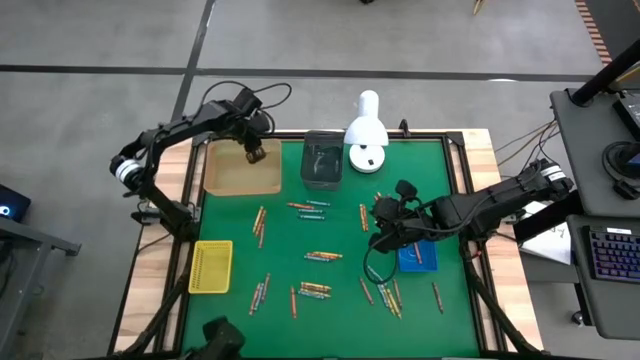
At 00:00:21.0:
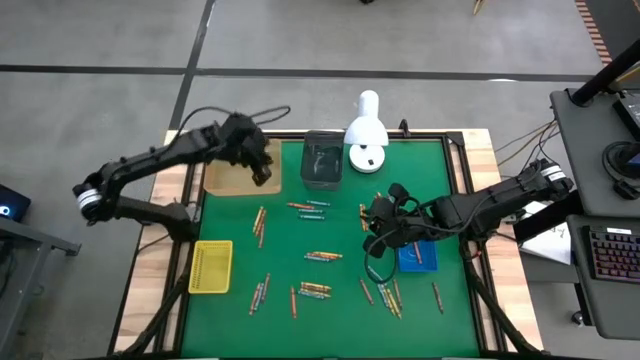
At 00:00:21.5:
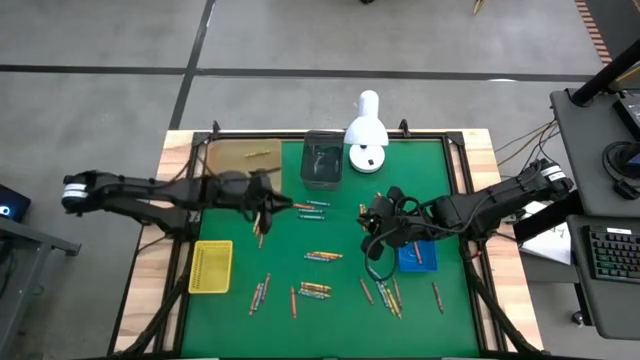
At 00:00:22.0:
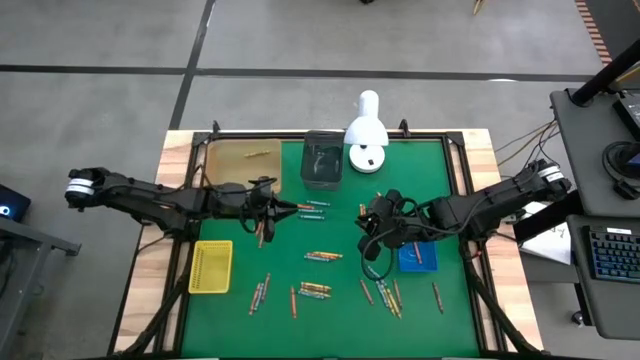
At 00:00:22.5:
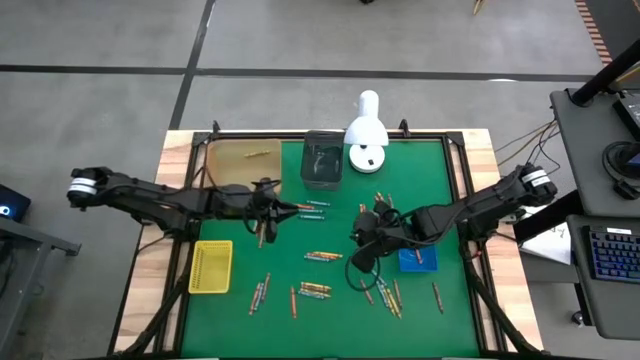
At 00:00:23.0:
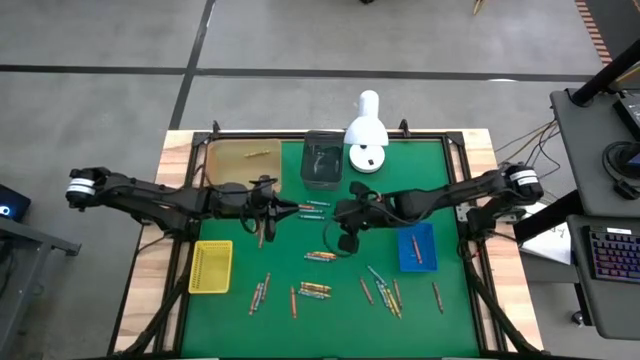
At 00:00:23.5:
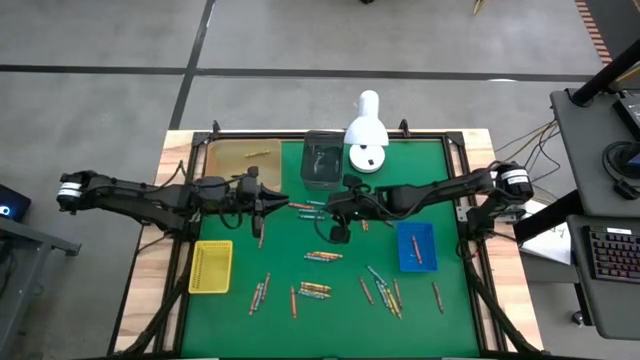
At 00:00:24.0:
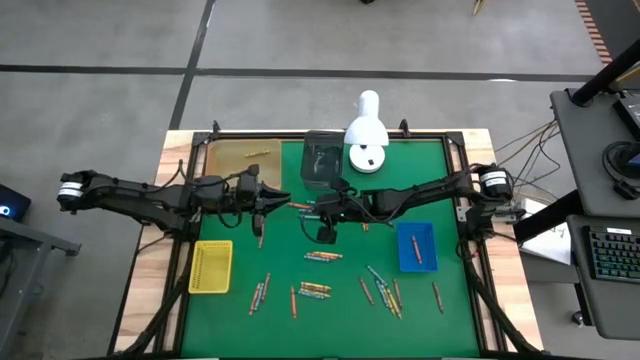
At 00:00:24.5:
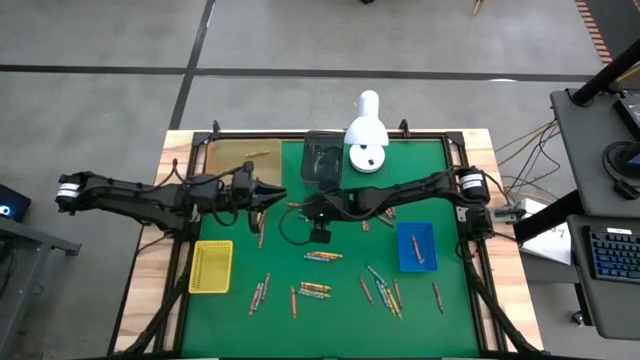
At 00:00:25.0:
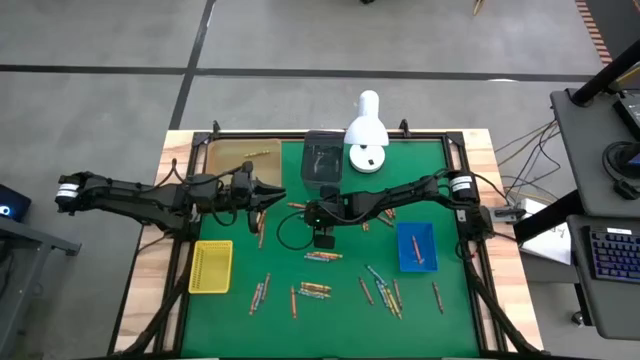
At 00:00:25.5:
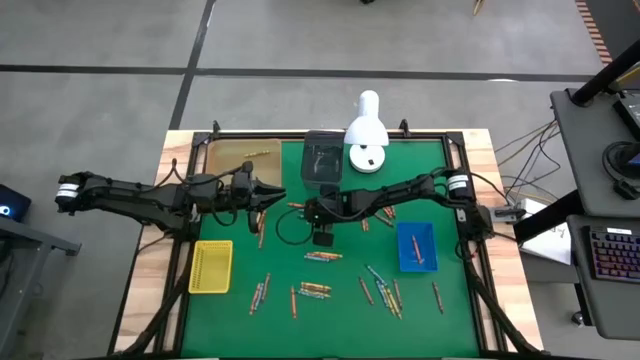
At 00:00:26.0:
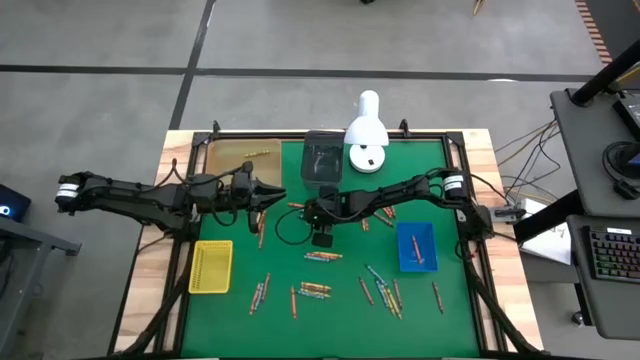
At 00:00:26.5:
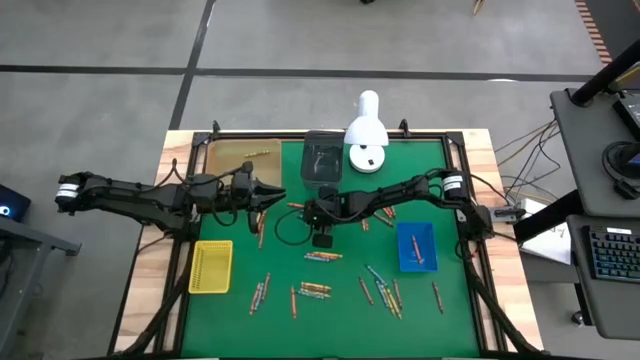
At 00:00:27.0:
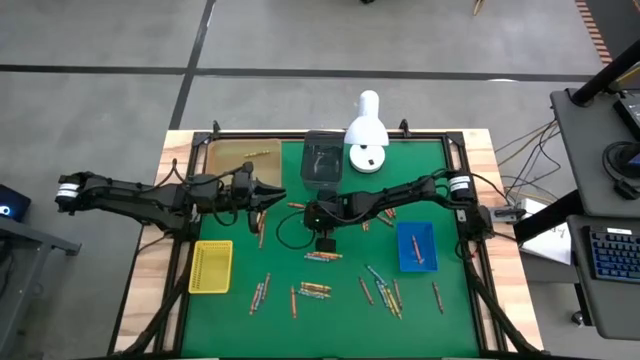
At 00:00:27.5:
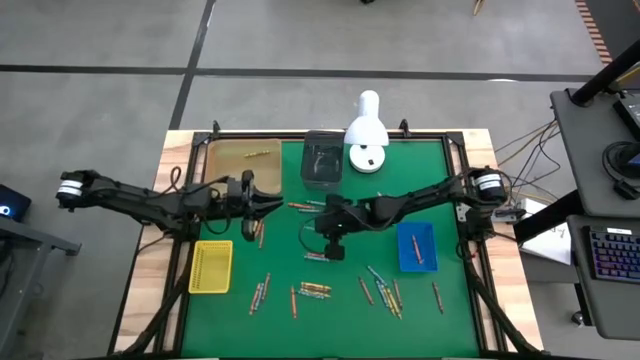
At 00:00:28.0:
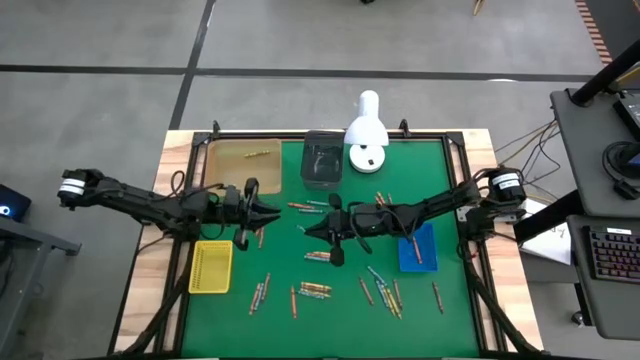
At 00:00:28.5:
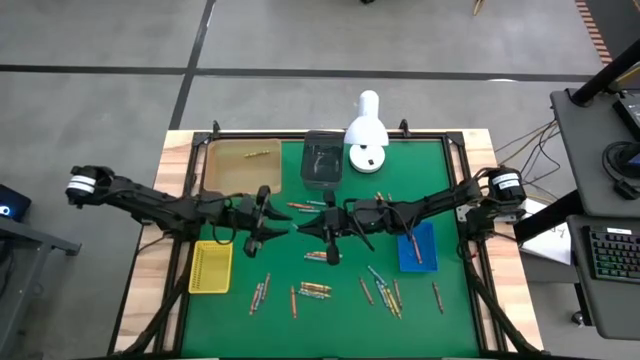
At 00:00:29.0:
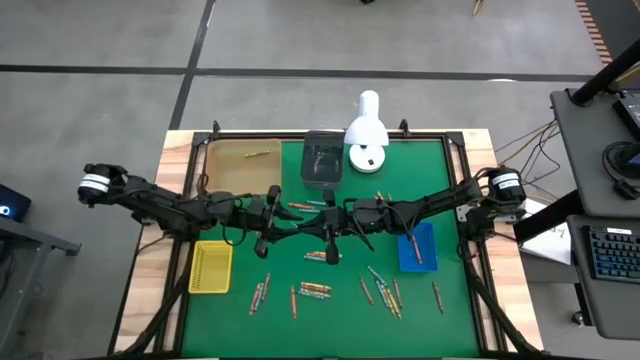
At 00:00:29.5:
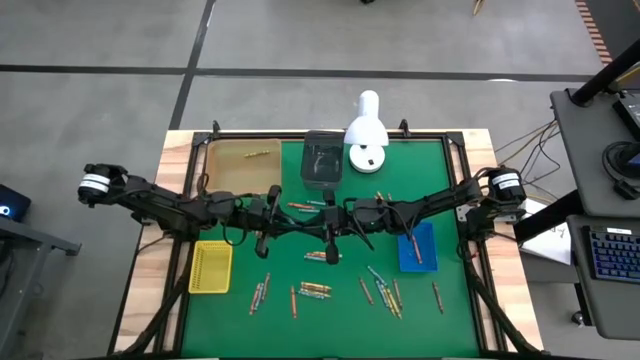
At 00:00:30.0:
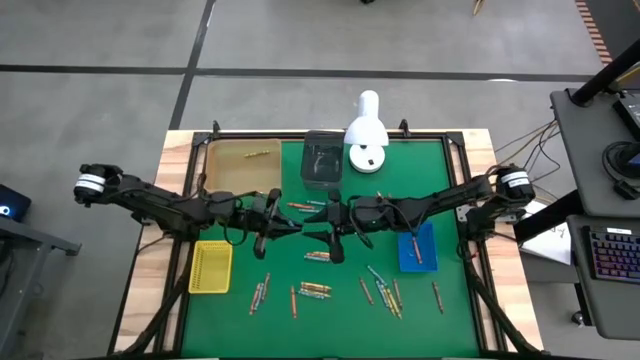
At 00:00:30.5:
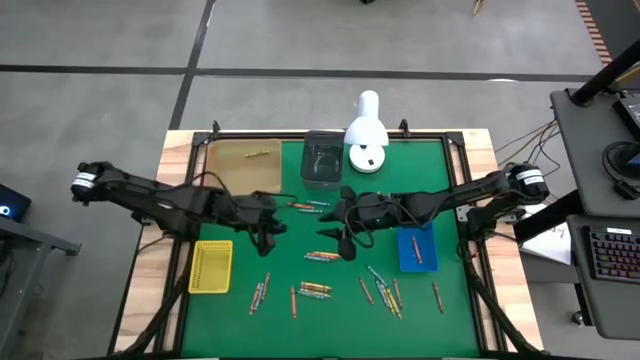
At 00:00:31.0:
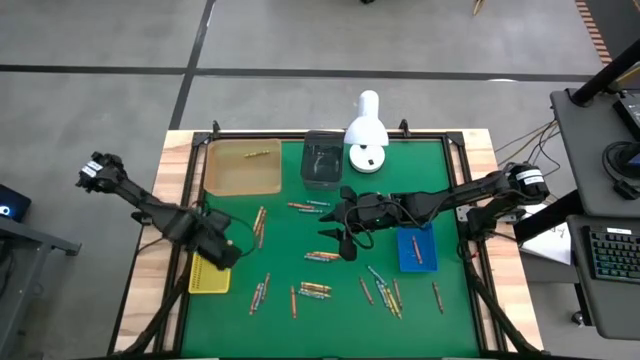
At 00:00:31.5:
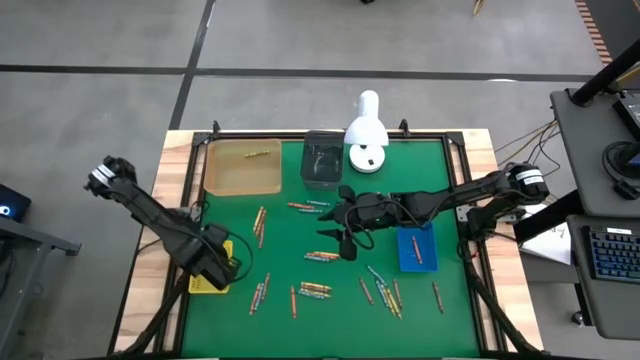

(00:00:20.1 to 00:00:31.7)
Task: Sort crayons
Put the blue crayon into the yellow bin

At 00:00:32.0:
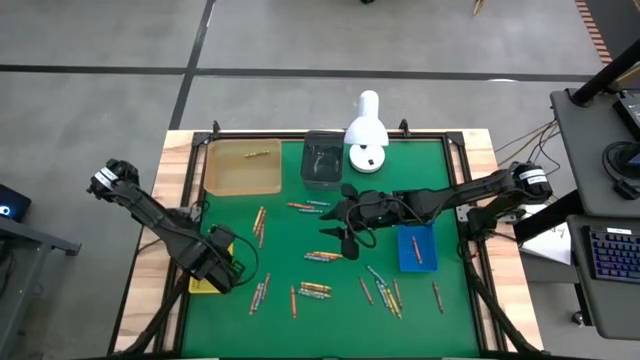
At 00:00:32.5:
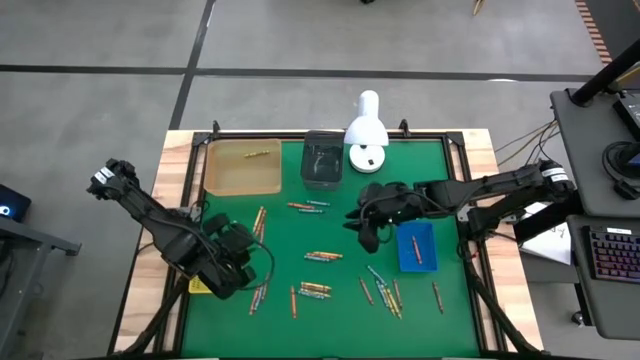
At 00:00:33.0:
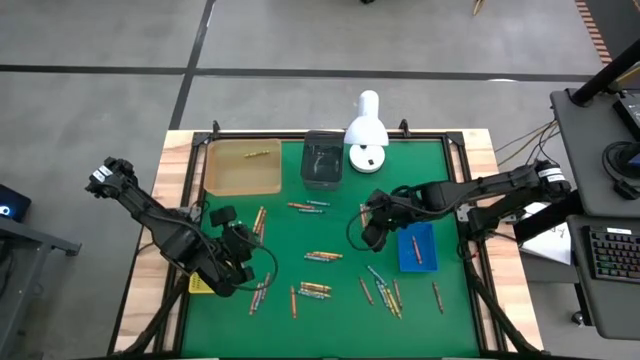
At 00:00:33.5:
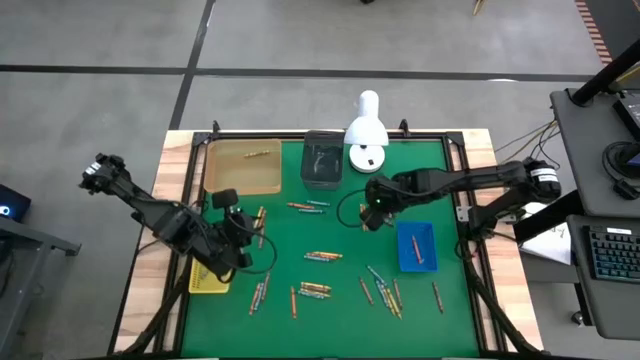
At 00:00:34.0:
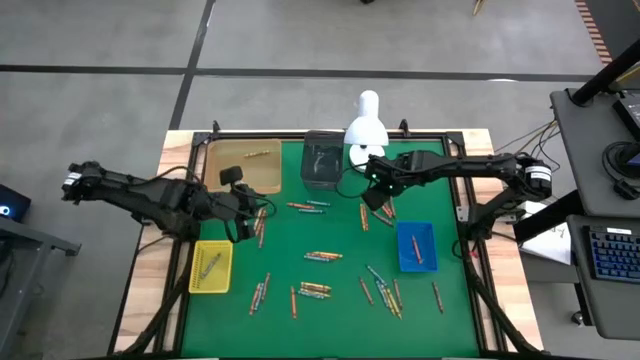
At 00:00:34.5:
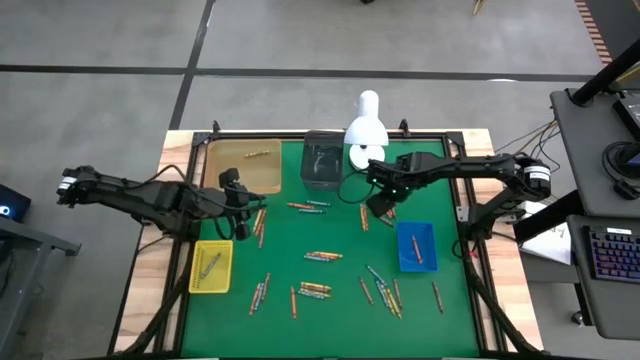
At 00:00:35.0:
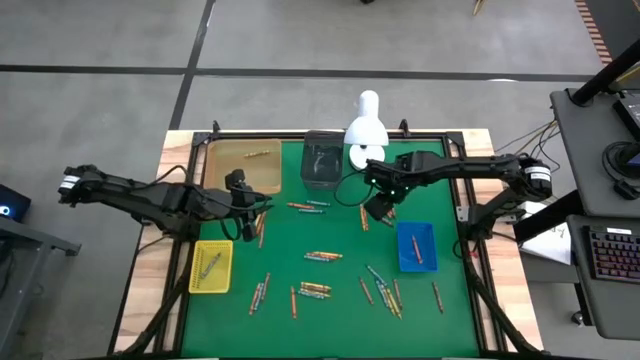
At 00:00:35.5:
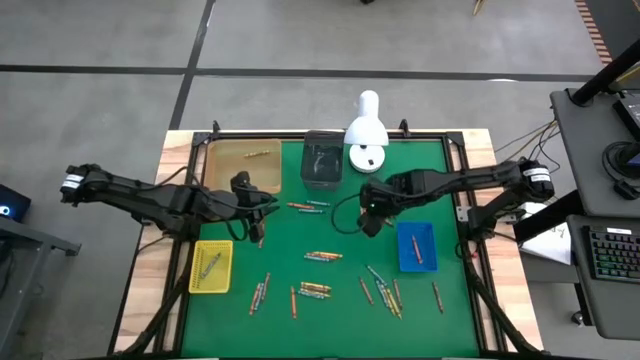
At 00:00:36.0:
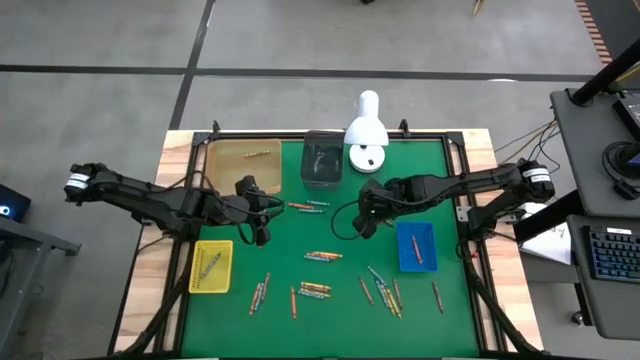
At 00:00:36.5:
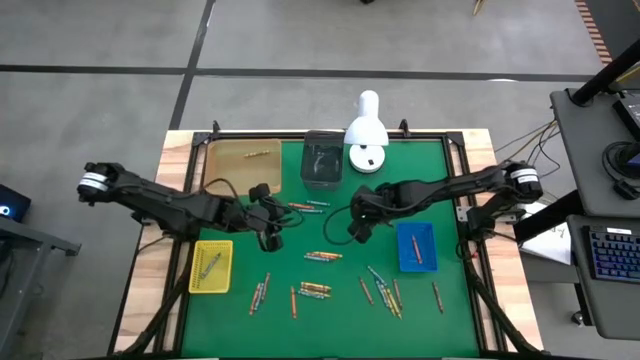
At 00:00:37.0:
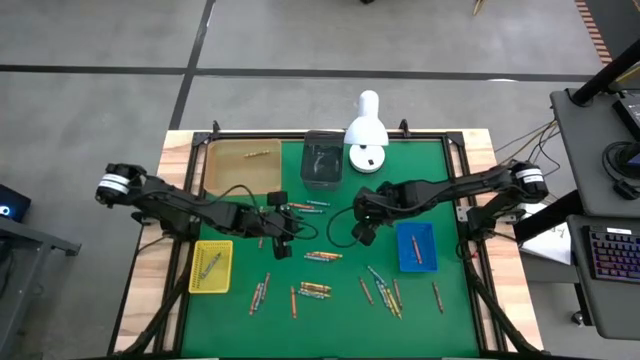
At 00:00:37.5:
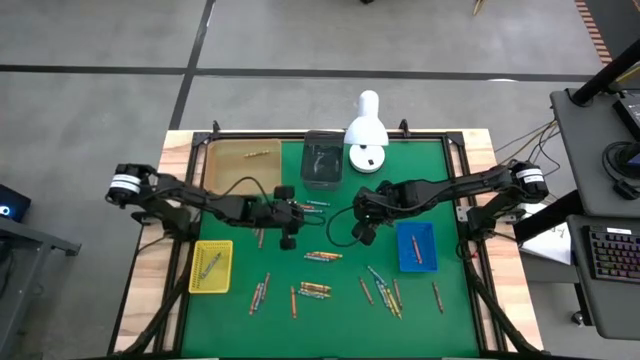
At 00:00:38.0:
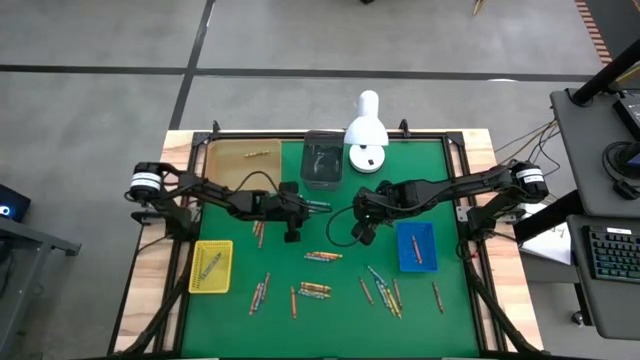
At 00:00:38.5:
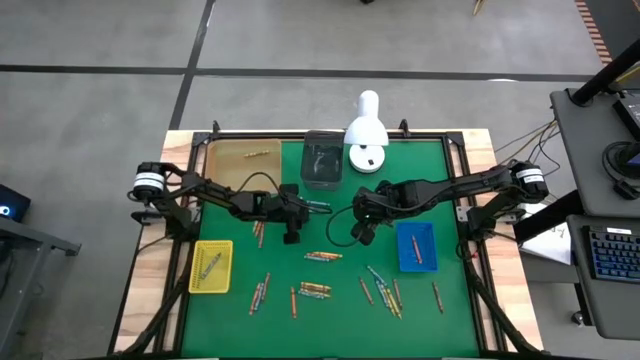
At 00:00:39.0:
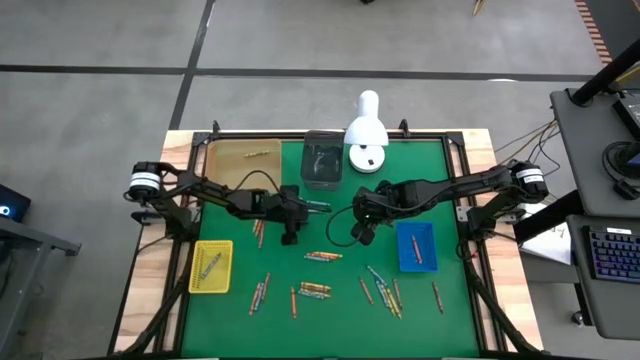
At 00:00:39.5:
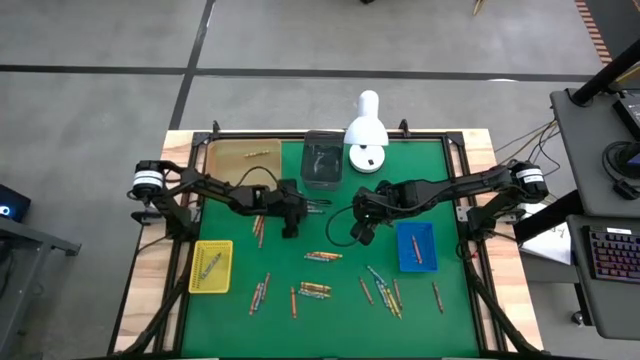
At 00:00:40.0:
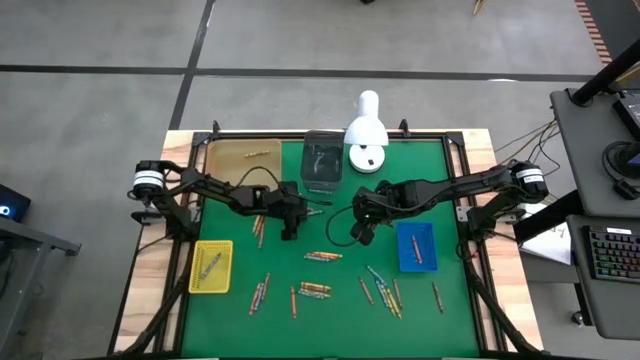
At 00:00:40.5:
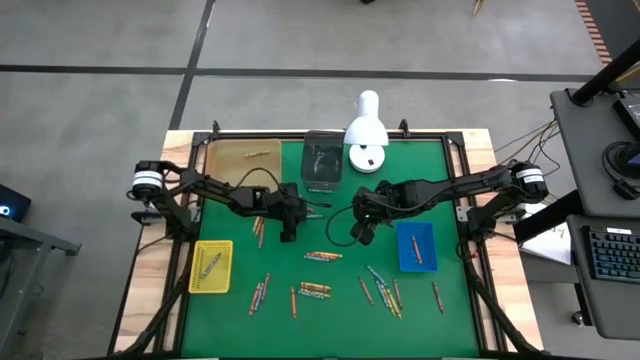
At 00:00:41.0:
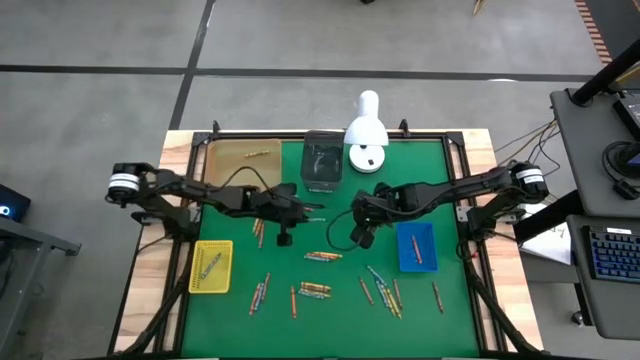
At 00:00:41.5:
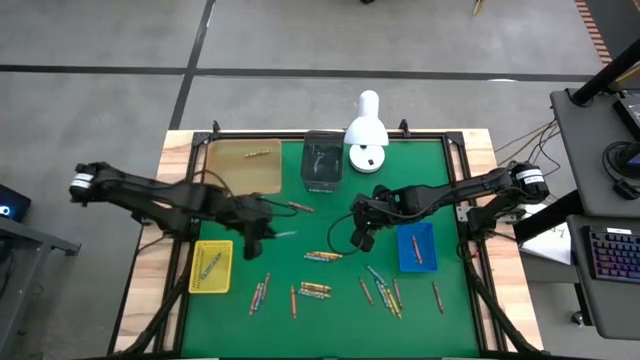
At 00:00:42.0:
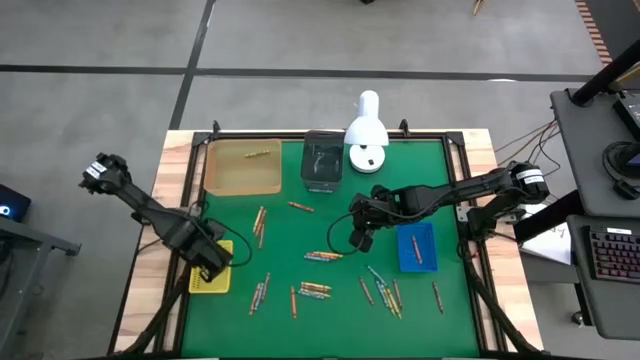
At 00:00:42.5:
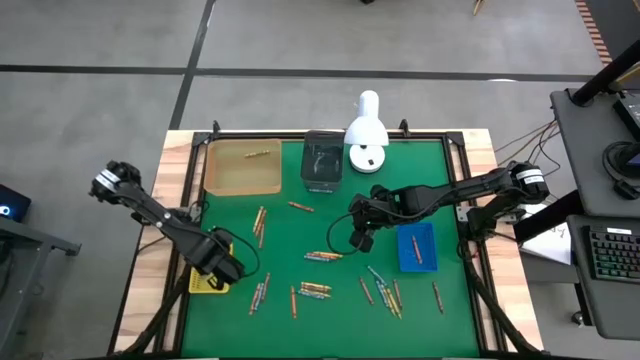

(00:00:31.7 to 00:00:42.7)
Put the blue crayon into the yellow bin
